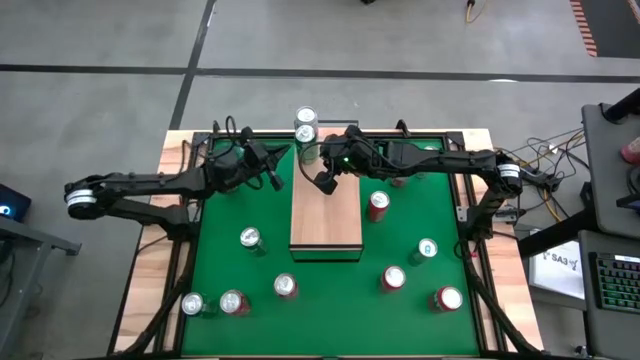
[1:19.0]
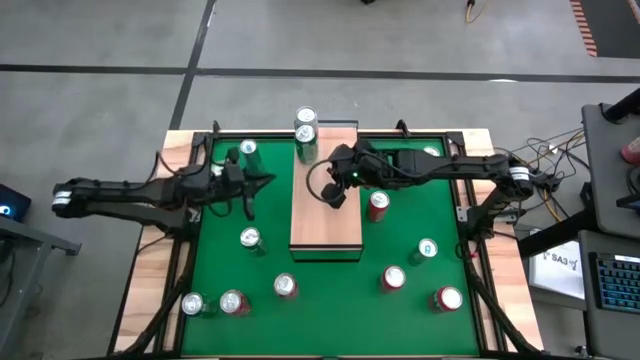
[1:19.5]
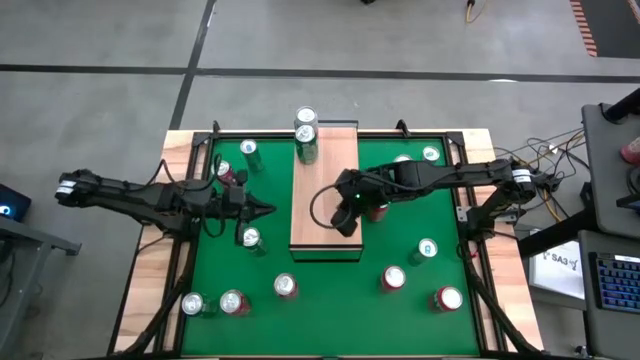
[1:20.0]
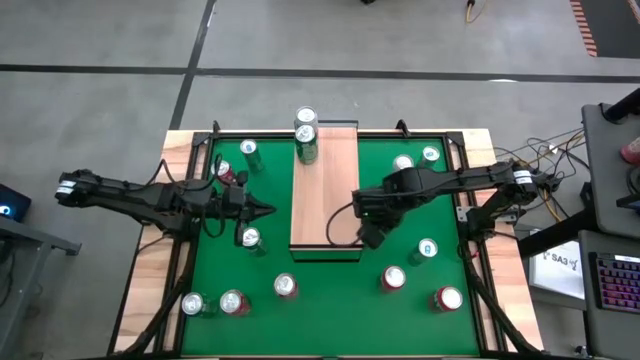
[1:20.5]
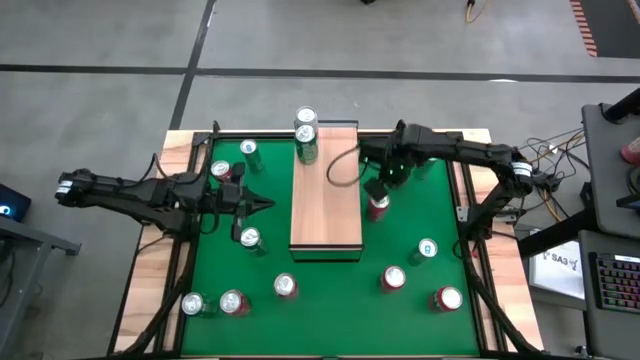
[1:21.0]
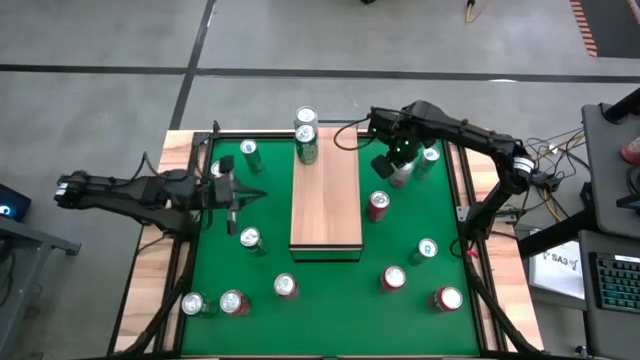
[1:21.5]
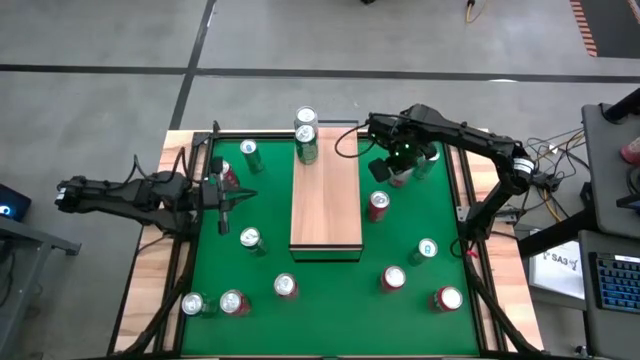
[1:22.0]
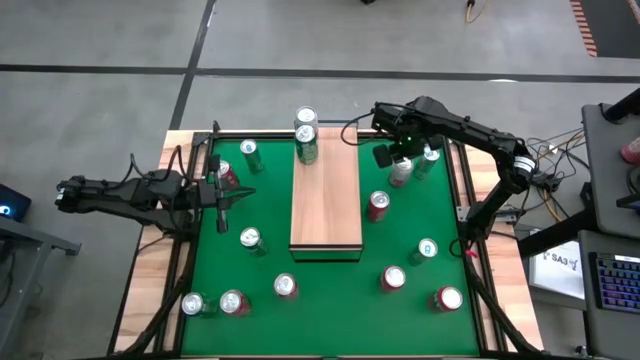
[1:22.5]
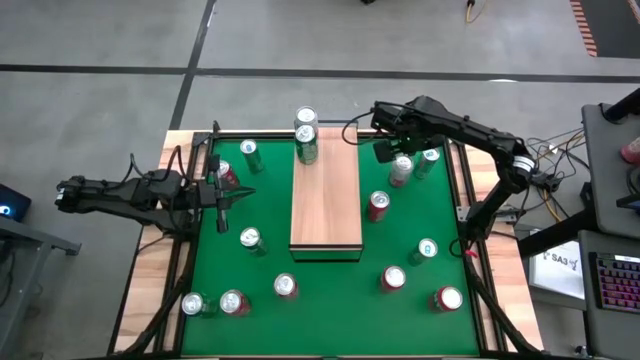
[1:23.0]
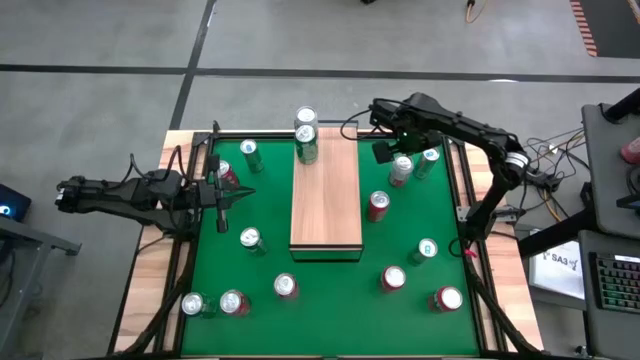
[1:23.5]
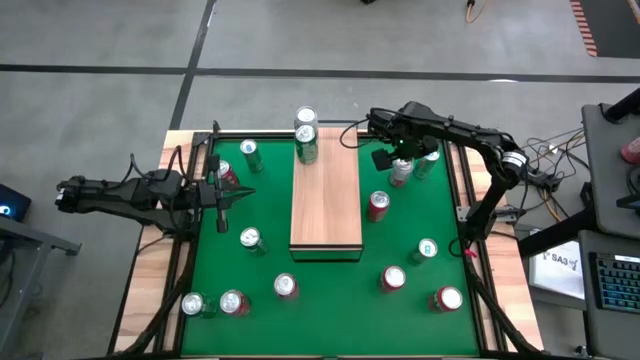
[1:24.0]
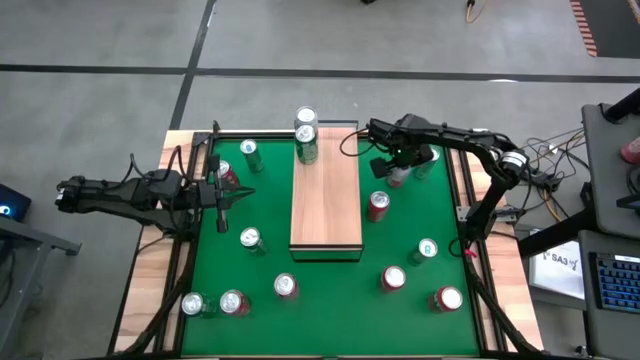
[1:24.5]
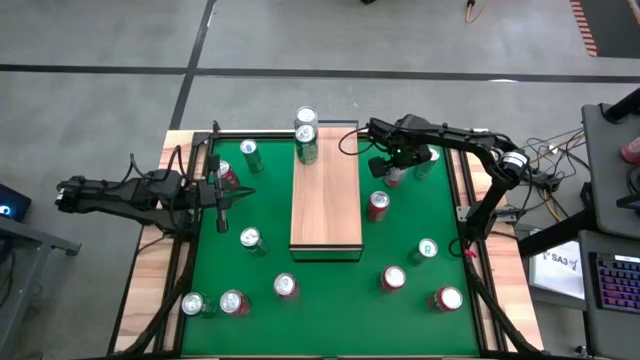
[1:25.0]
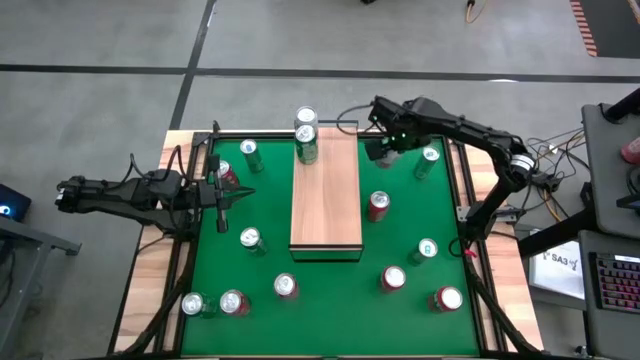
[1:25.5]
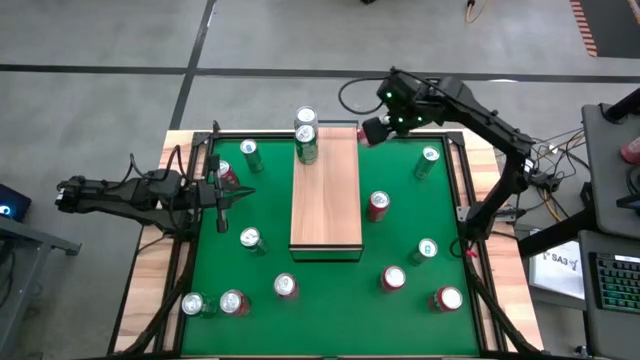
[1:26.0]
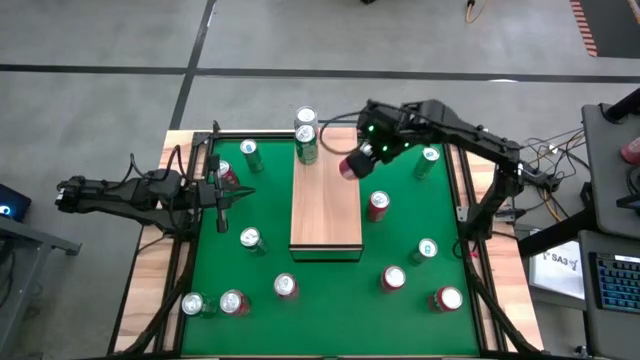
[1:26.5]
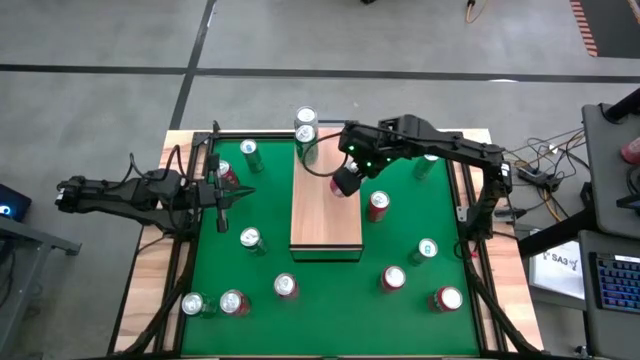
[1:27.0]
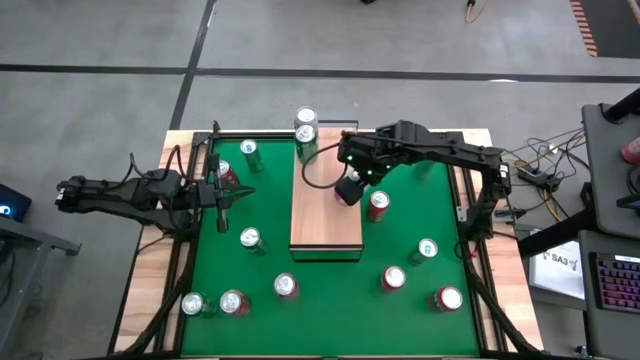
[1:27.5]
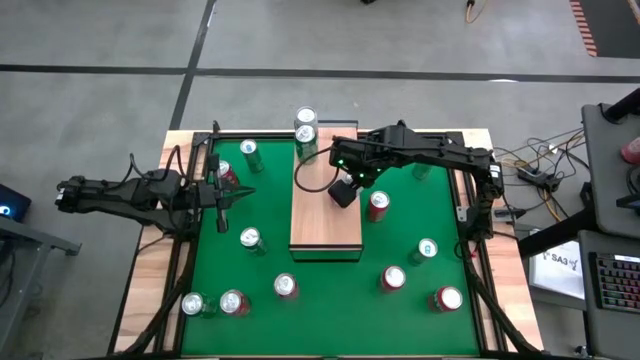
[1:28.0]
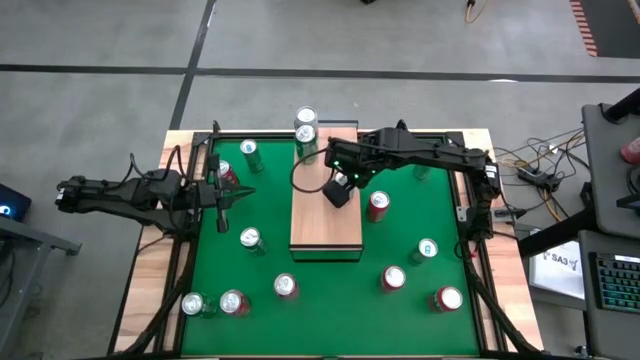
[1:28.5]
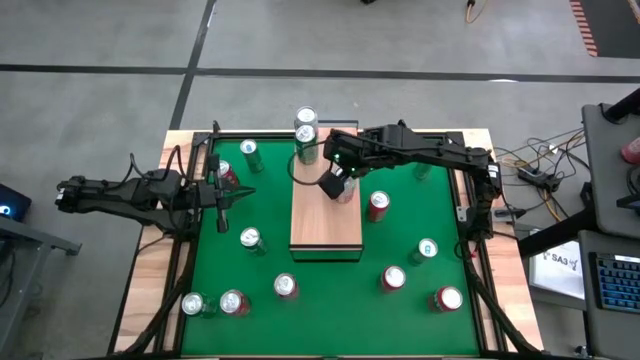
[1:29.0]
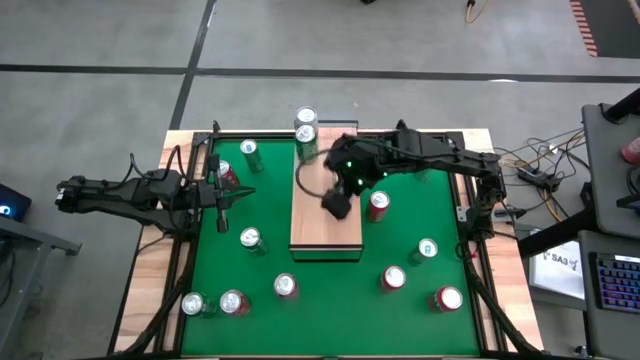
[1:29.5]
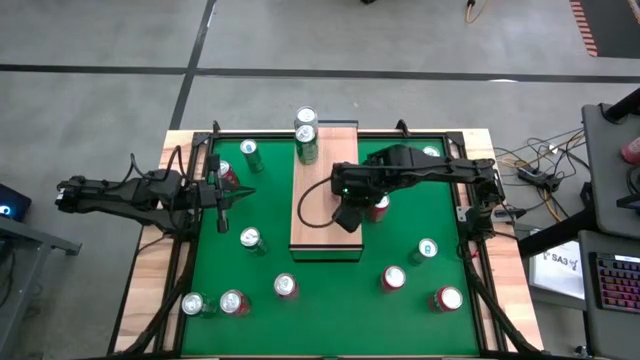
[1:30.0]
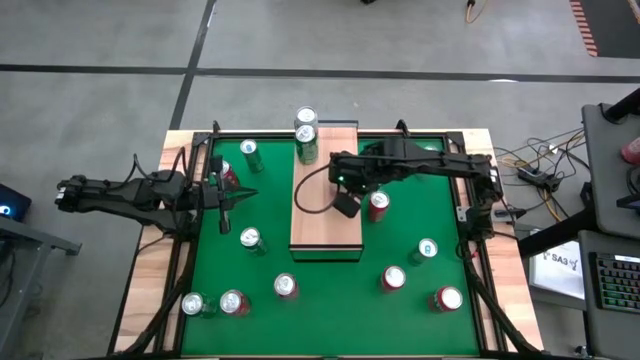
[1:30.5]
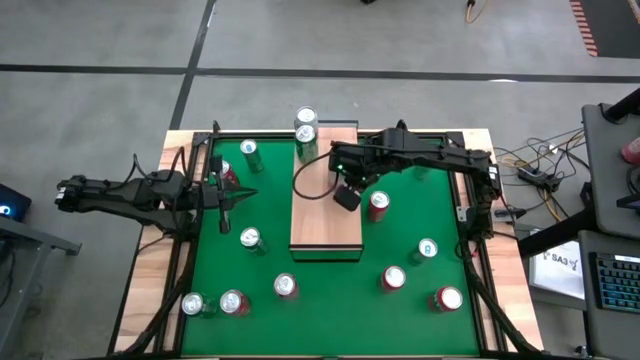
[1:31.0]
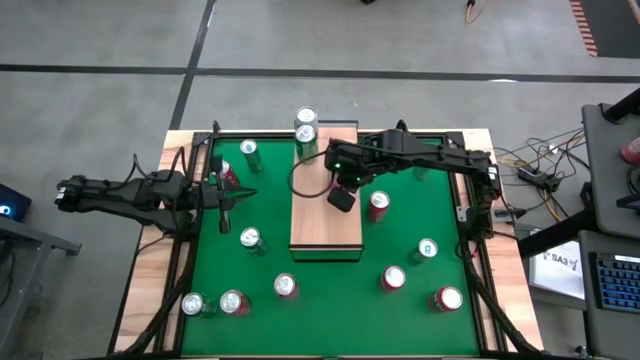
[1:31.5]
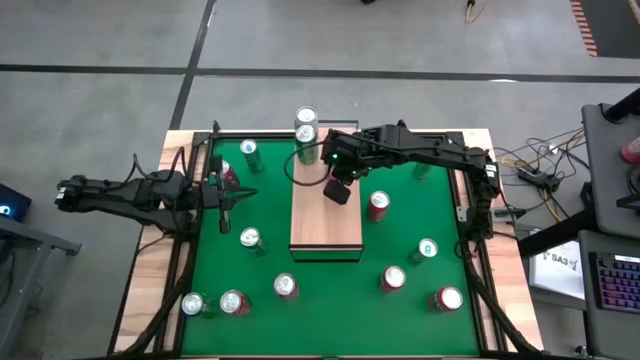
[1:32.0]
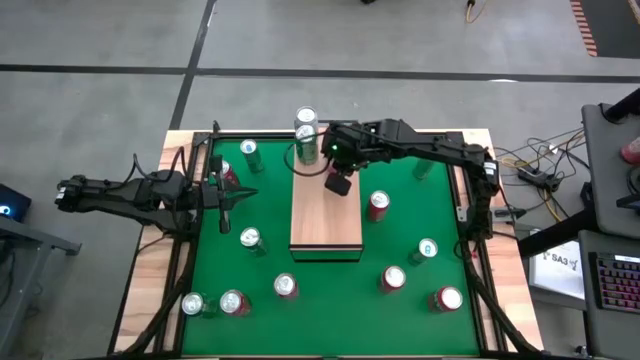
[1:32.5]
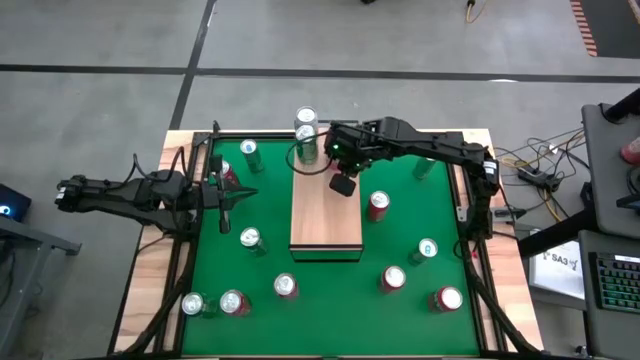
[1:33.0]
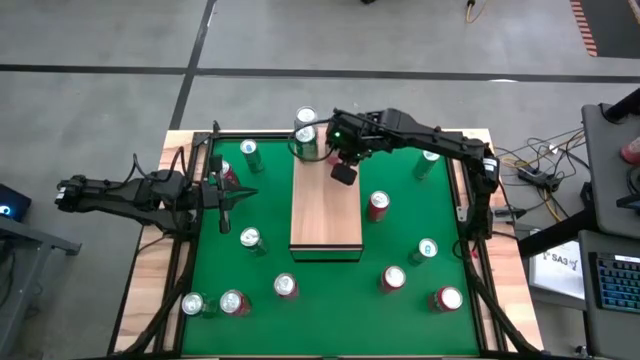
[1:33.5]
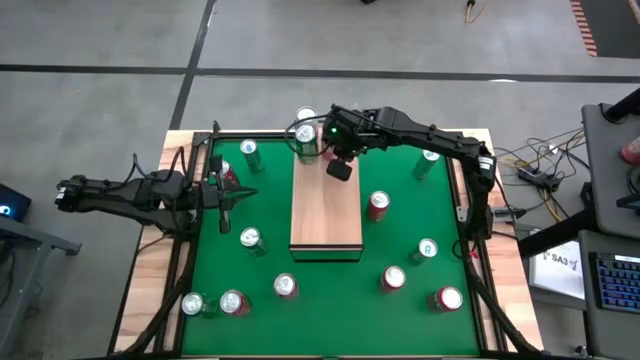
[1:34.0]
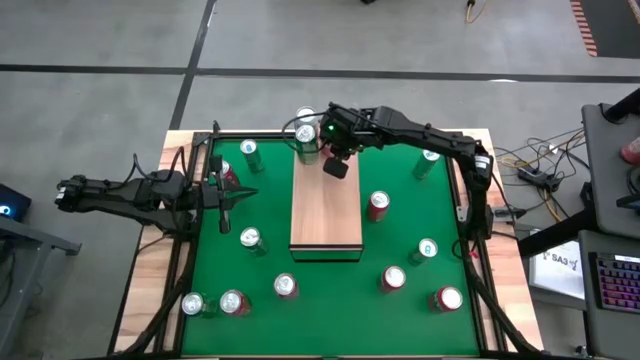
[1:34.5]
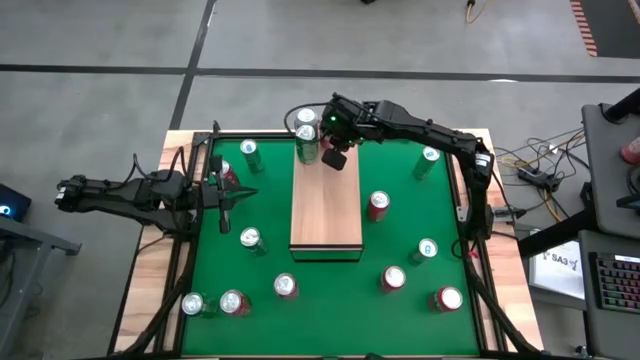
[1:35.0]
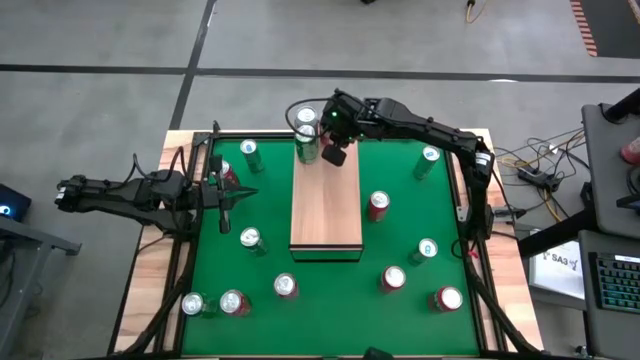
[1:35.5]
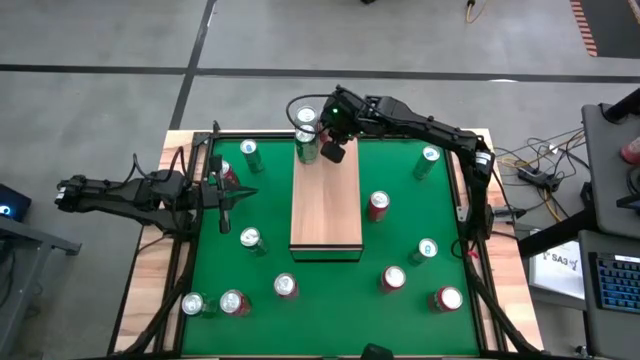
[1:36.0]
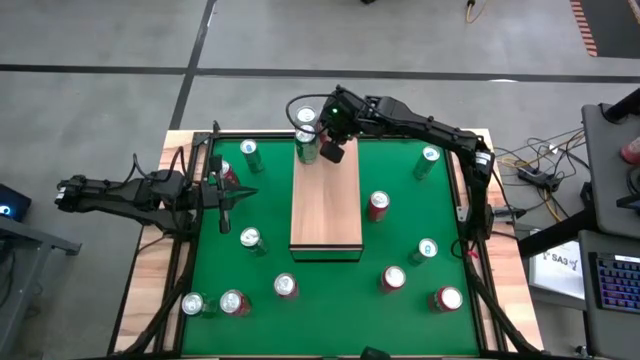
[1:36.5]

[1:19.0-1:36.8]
Task: Place canned beverage on shelf
Put the white can on the shelf

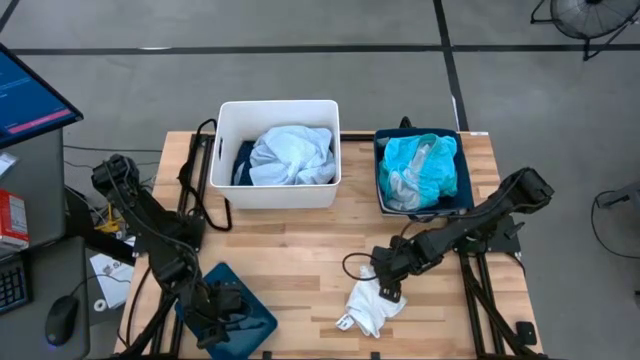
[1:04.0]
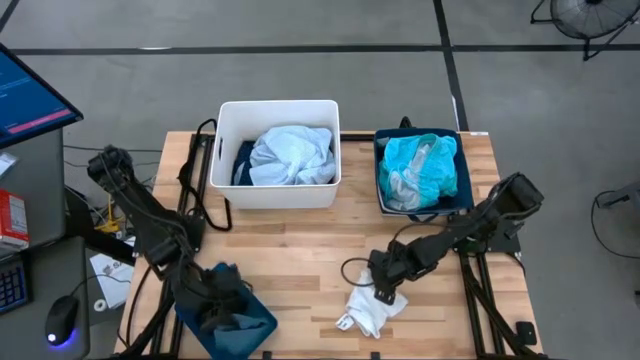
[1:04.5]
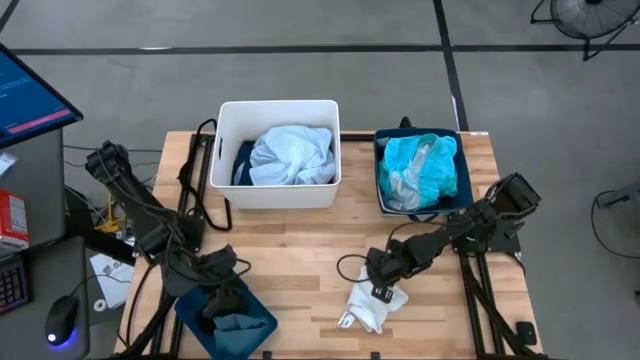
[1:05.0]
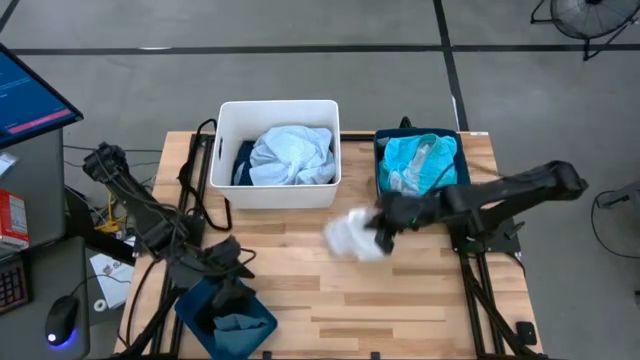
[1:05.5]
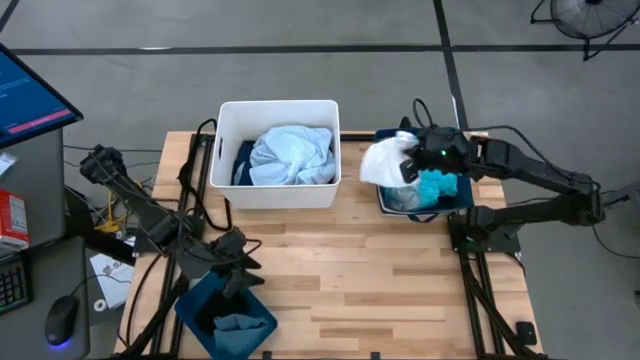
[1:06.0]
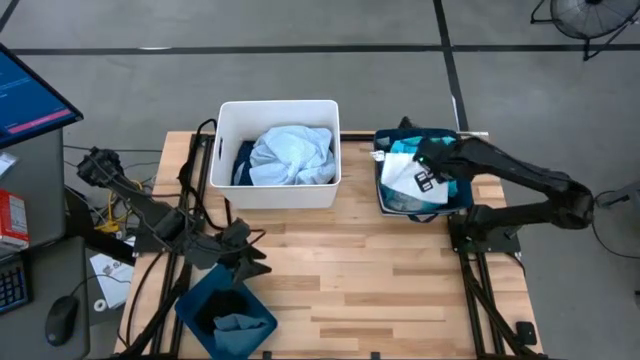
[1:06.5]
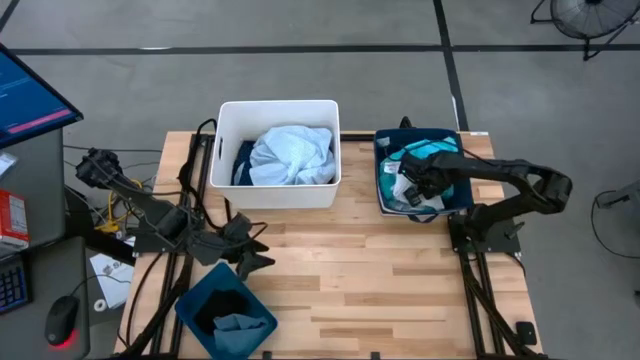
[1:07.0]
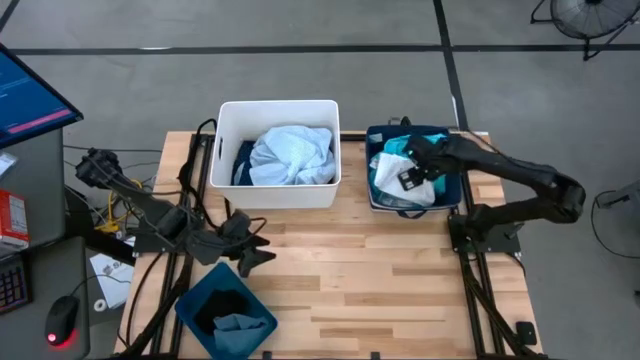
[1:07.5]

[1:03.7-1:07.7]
Task: Pick & Place Cloths
Put the white boxer shorts into the dark blue laundry organizer
